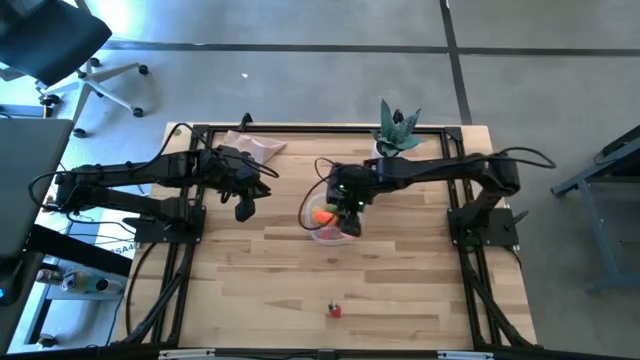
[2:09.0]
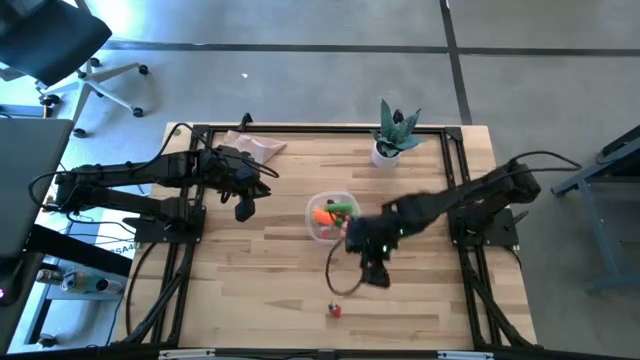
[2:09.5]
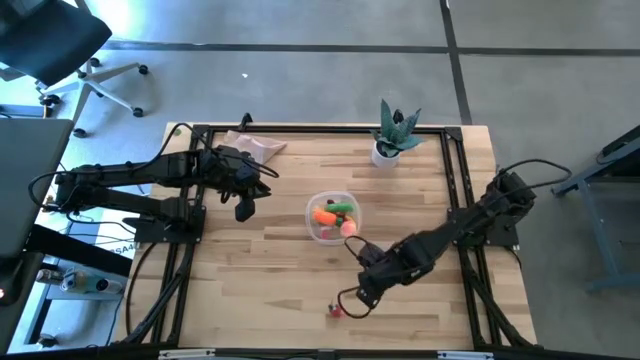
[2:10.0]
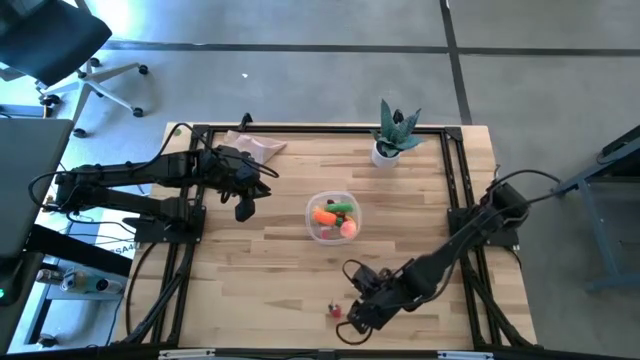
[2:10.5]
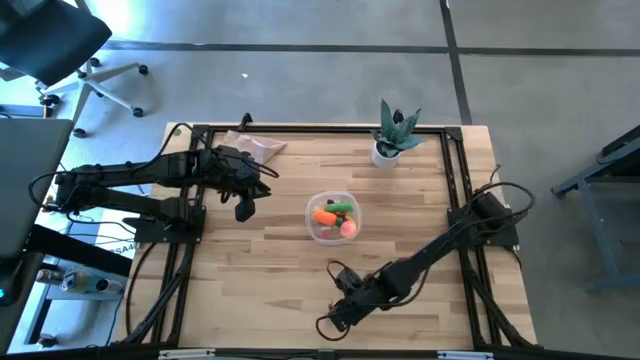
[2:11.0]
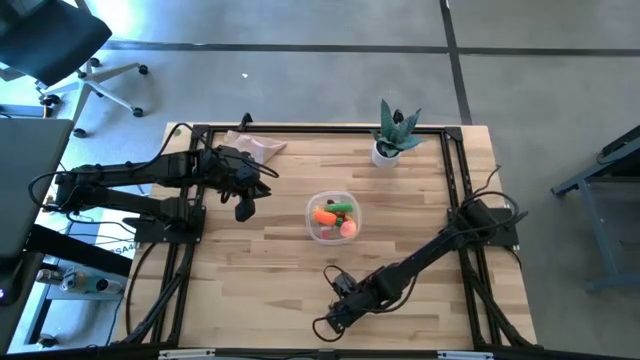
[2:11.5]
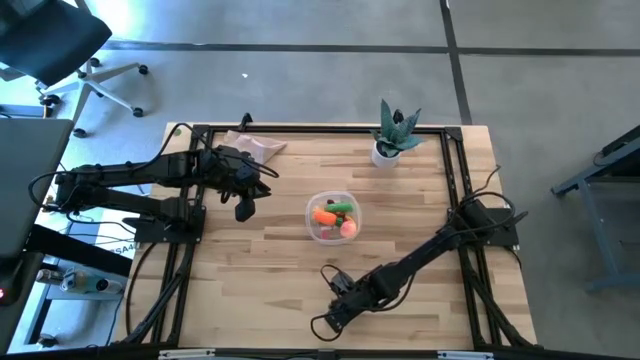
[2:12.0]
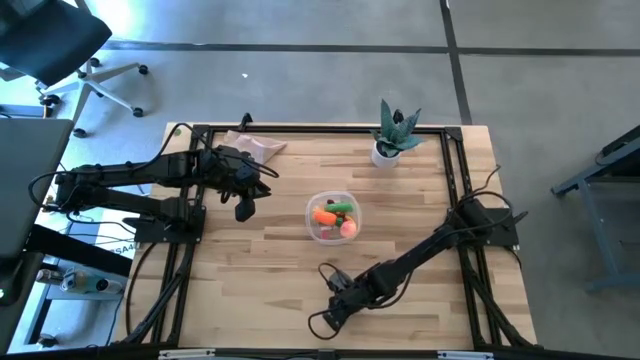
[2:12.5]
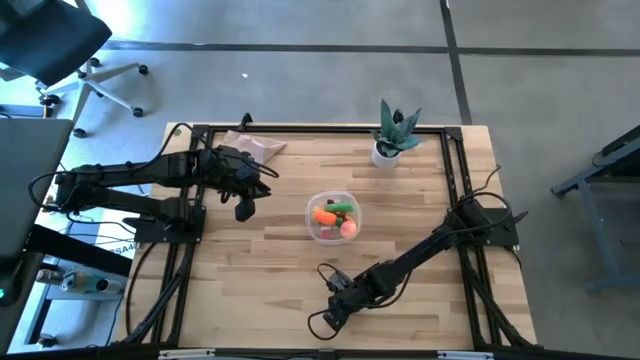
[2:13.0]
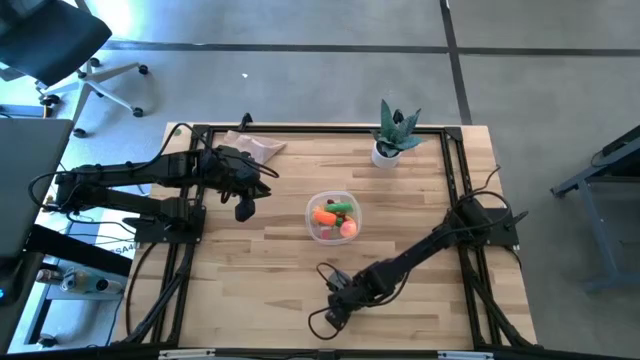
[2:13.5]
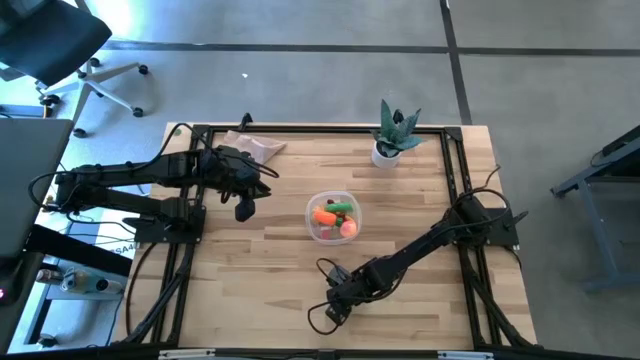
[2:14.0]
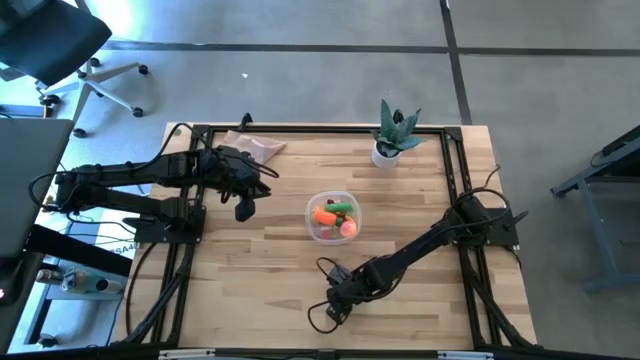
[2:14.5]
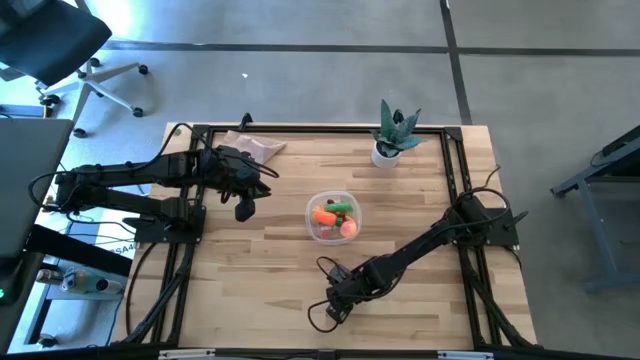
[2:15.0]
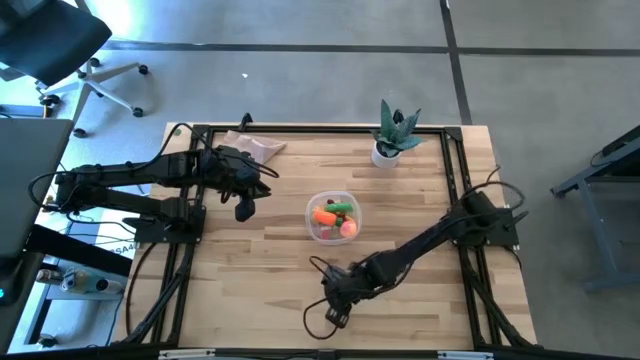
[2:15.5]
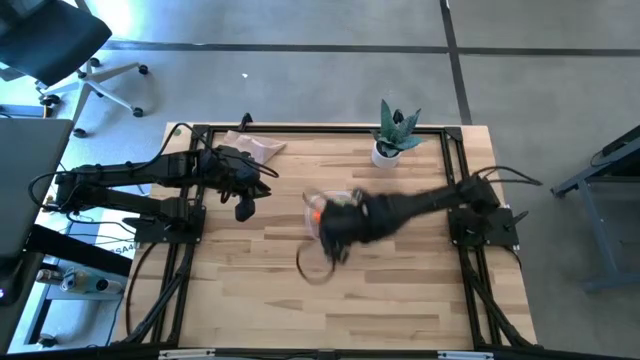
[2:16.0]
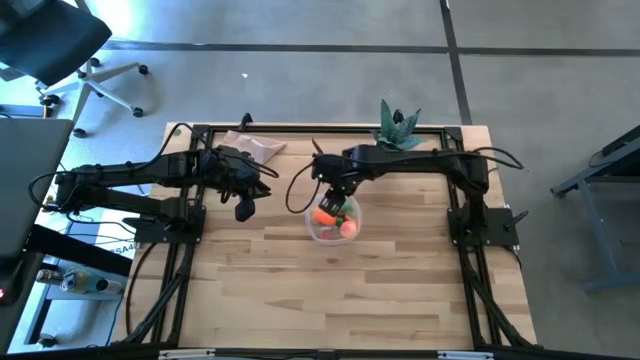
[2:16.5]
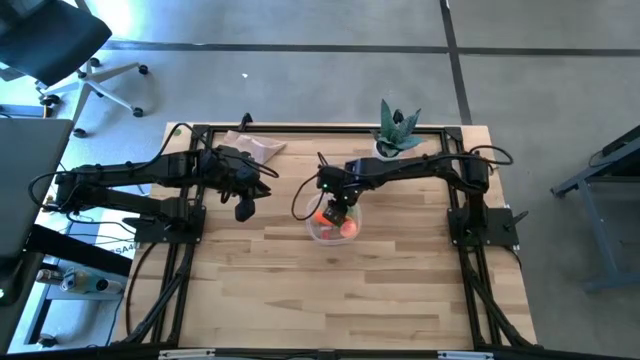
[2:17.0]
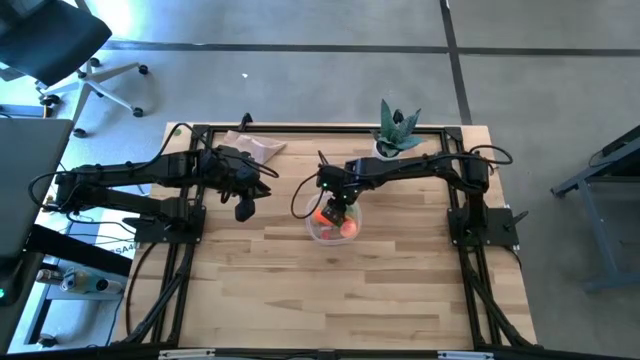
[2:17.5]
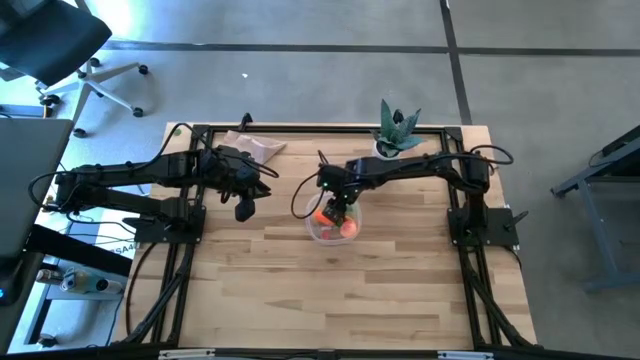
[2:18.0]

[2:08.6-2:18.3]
Task: Pick and placing Produce into tupperware
Put the strawberry into the transparent bin

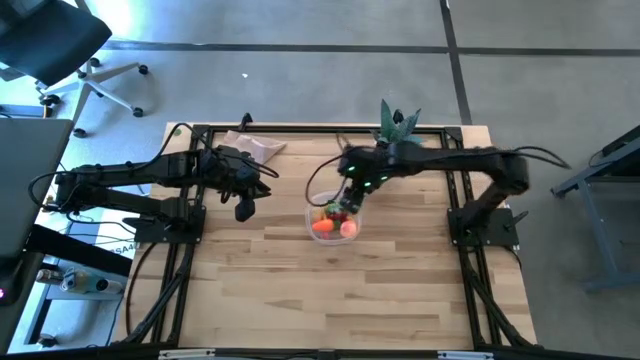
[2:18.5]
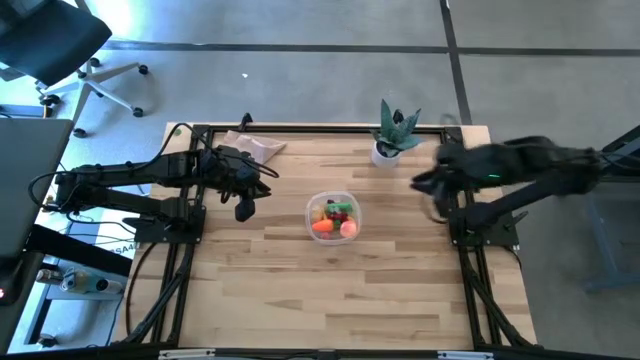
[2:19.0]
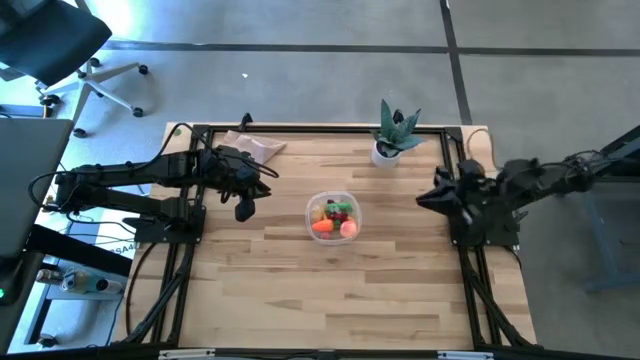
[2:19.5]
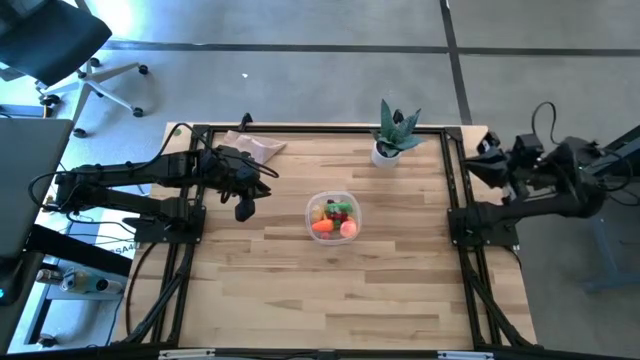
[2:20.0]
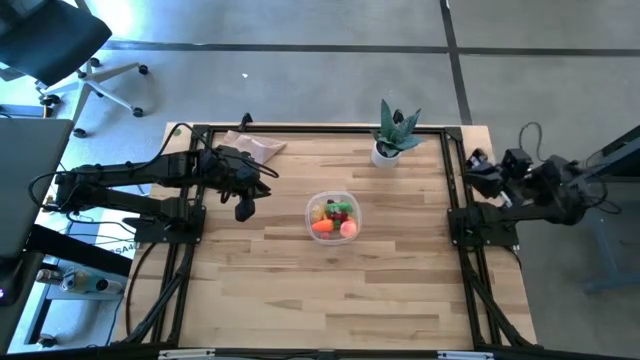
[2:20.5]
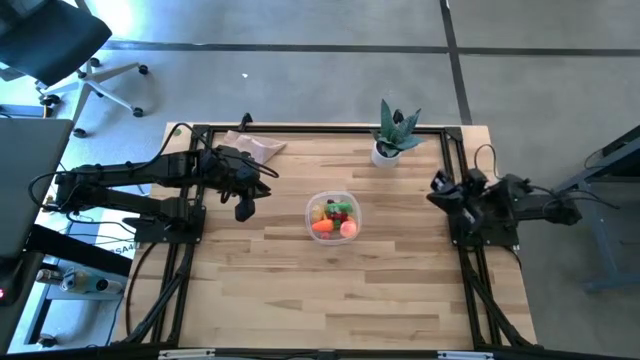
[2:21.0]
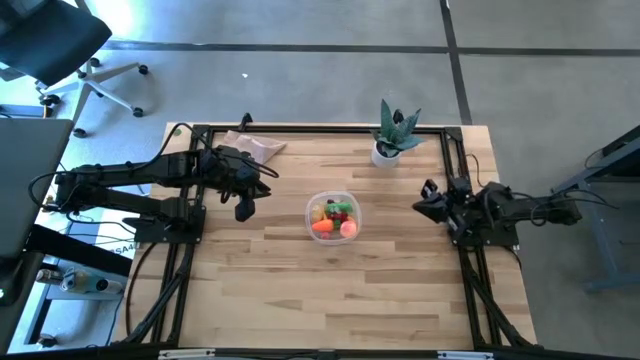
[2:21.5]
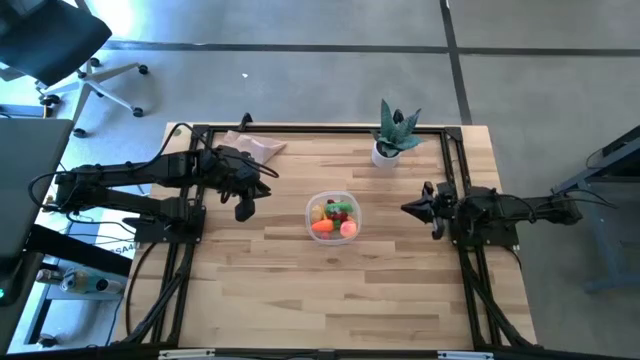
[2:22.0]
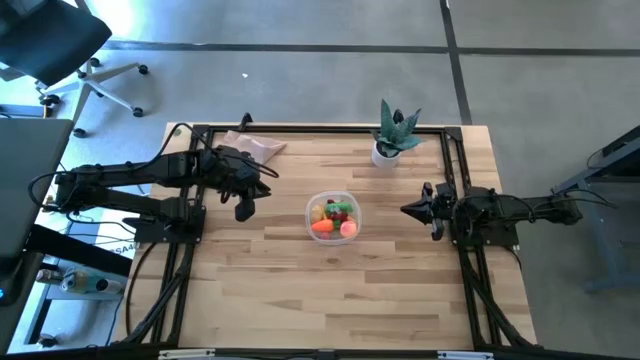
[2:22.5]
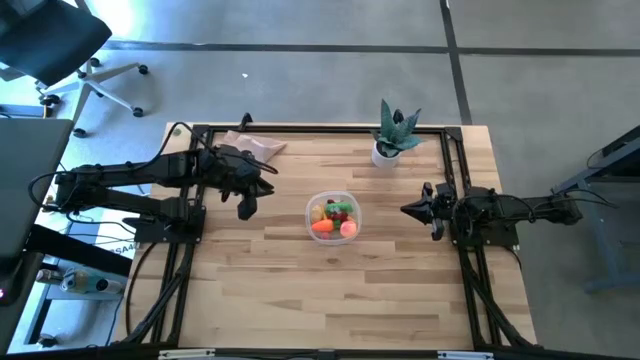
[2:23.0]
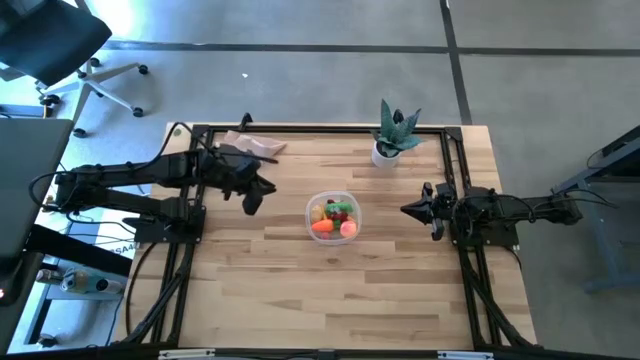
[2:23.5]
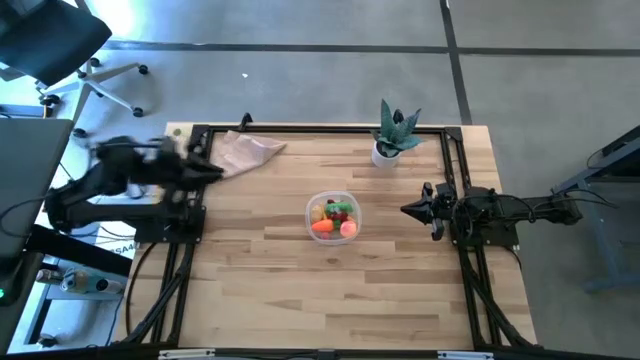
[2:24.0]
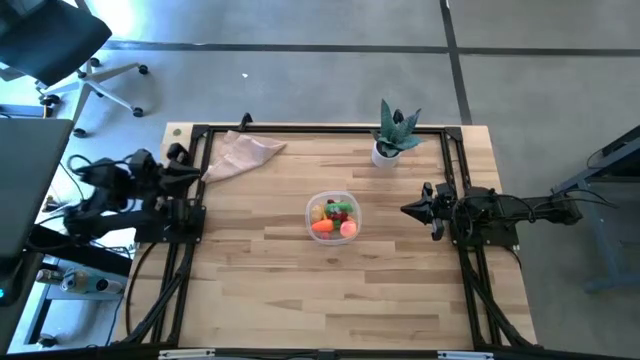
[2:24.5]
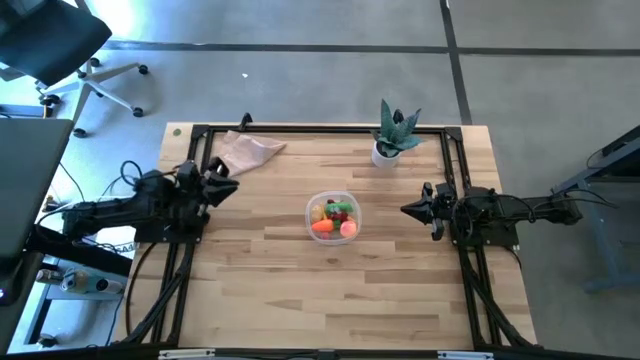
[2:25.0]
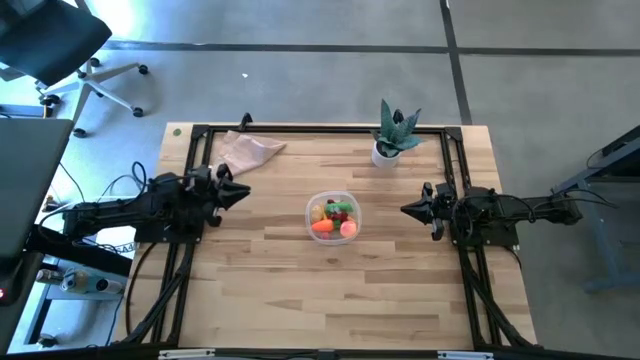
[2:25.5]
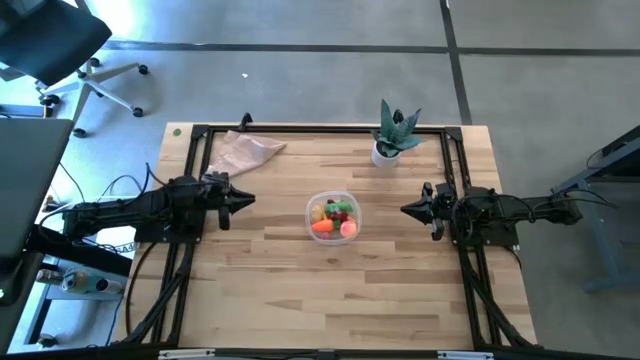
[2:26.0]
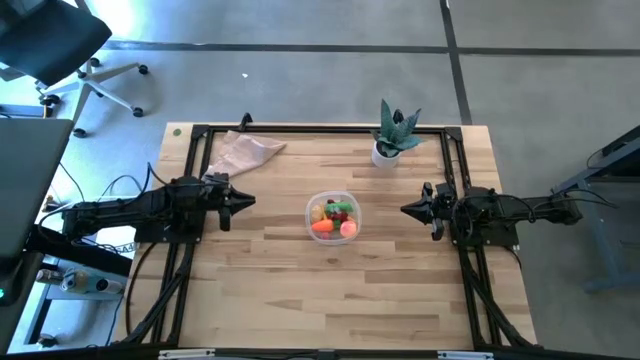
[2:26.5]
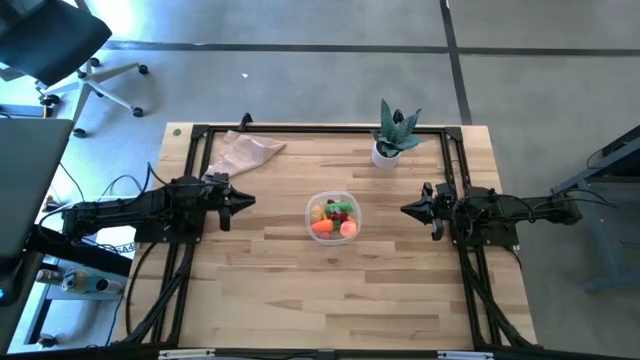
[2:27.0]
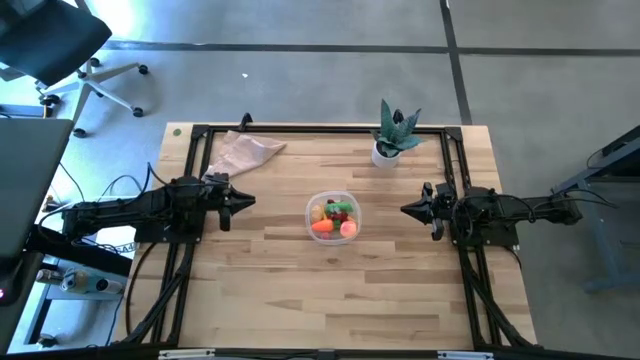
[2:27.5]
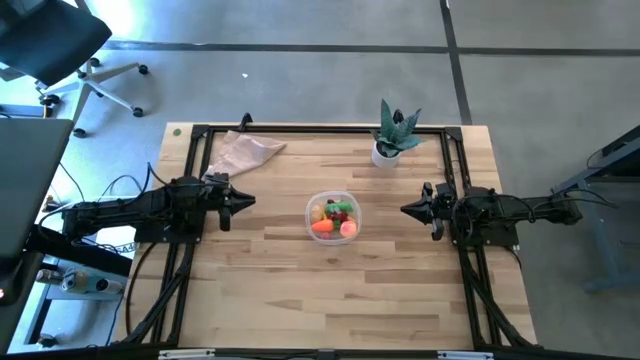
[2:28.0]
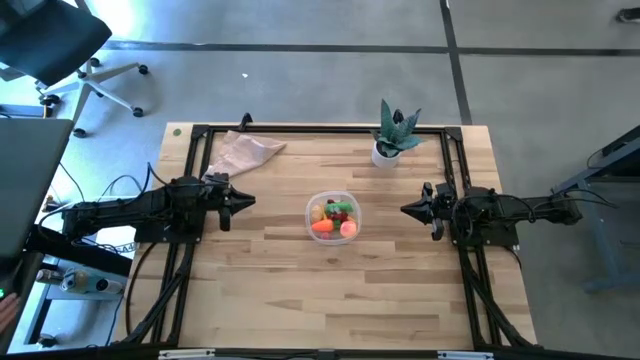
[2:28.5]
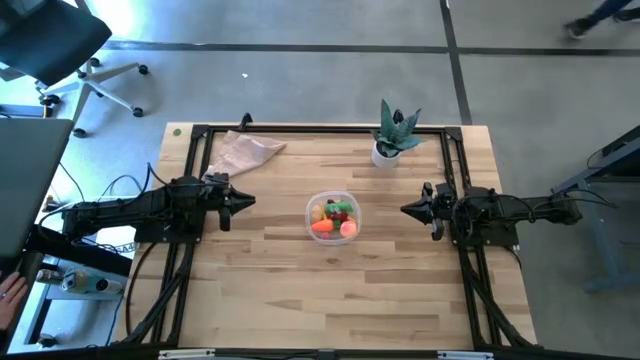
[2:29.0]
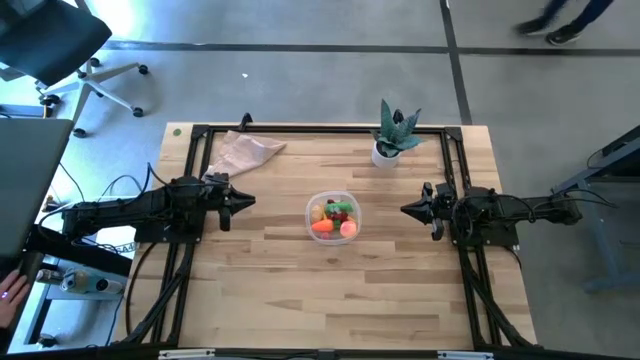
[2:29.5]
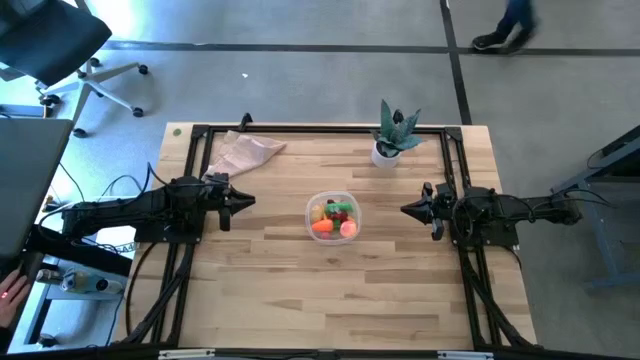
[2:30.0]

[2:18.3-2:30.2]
Return to Home Position
